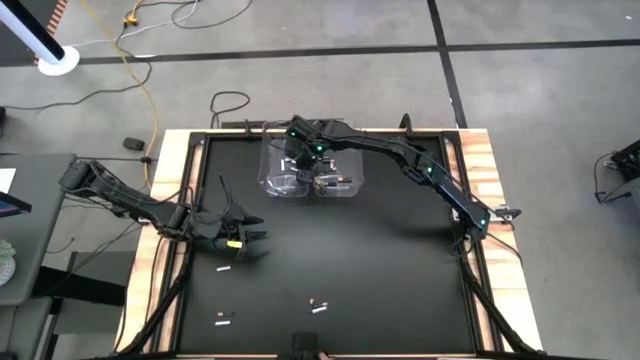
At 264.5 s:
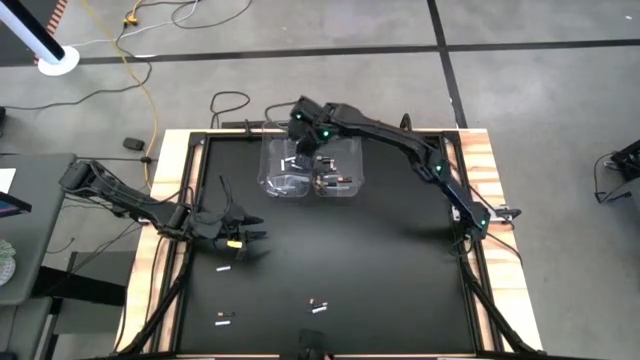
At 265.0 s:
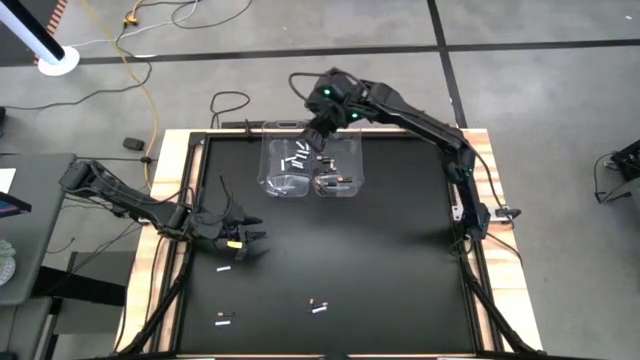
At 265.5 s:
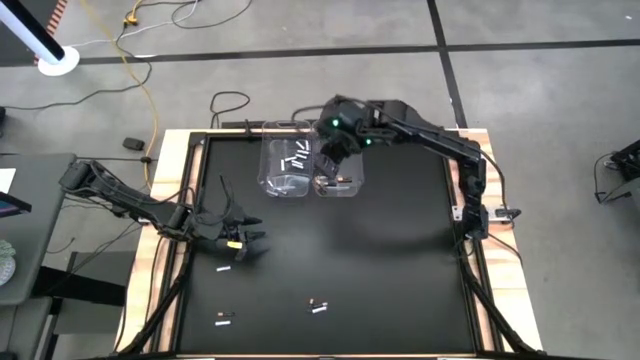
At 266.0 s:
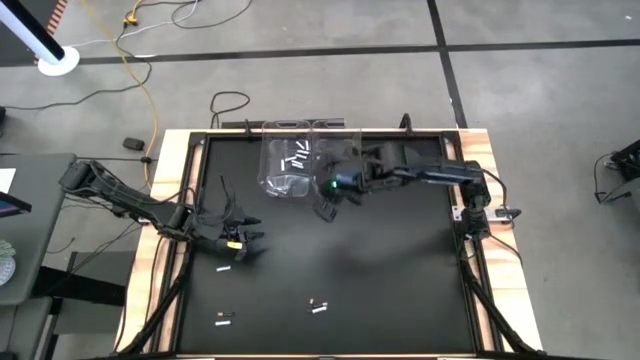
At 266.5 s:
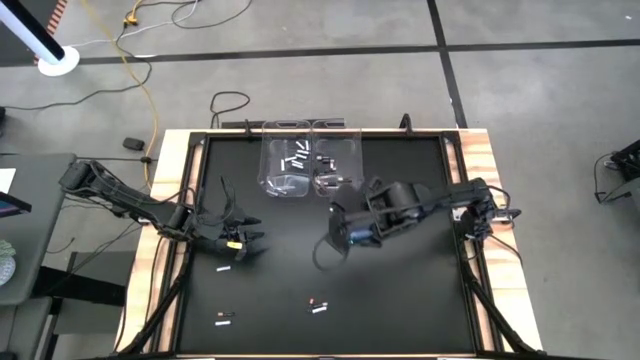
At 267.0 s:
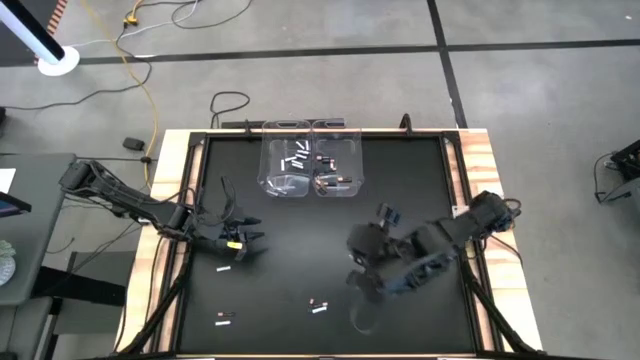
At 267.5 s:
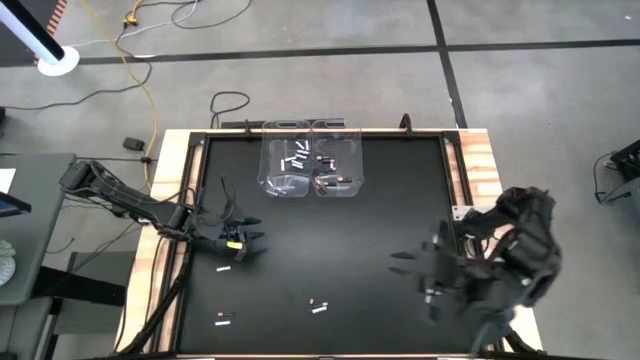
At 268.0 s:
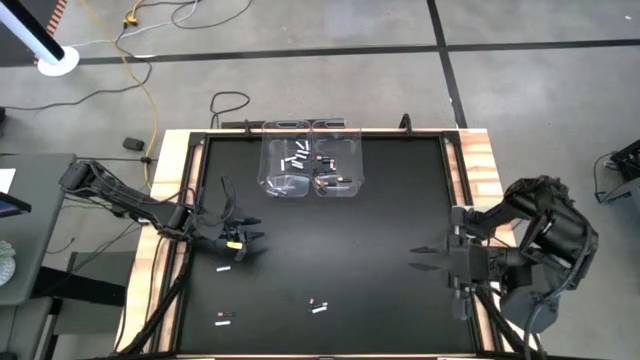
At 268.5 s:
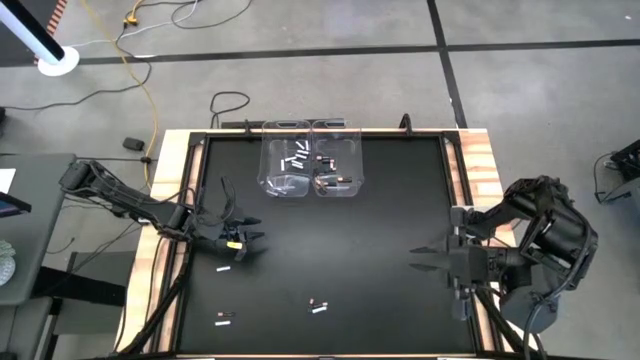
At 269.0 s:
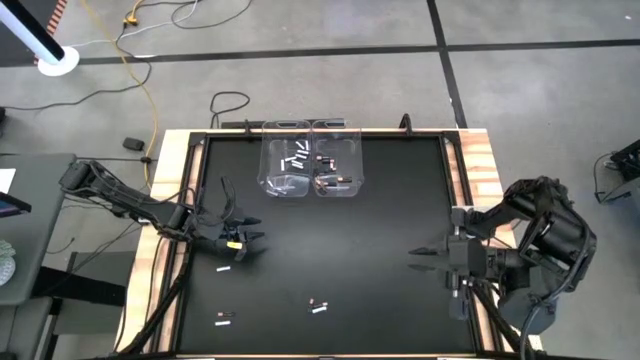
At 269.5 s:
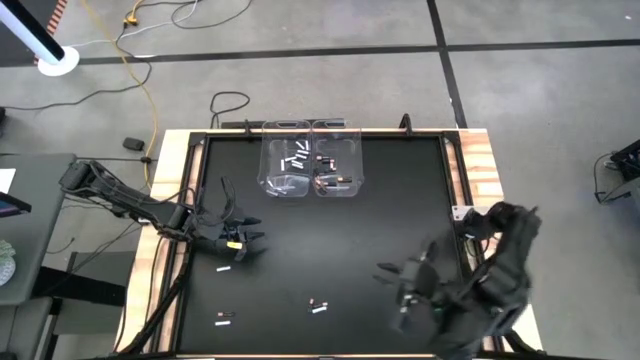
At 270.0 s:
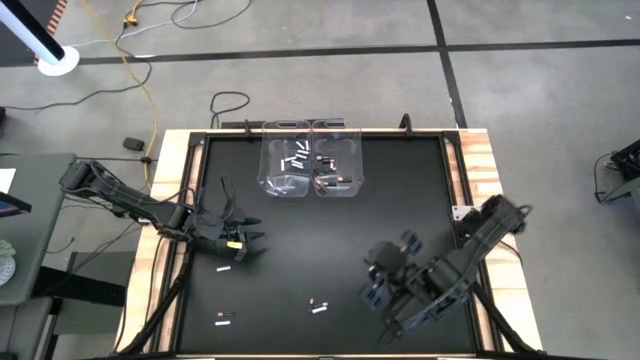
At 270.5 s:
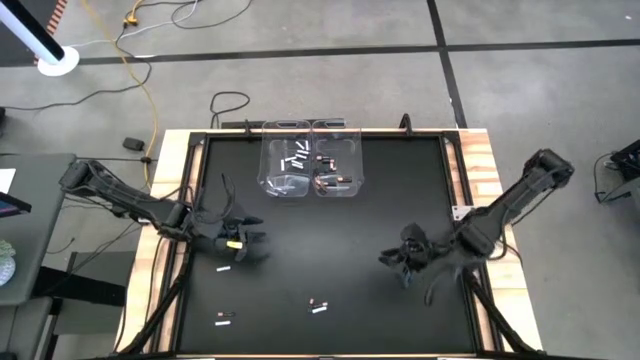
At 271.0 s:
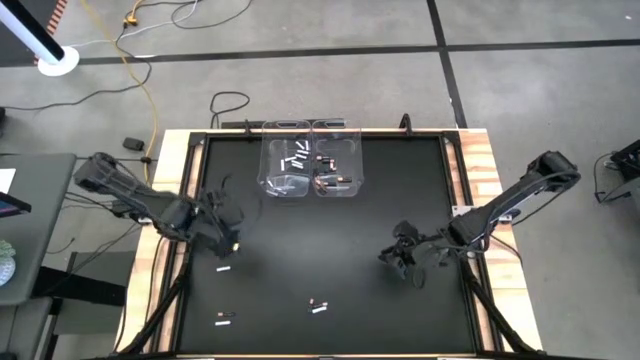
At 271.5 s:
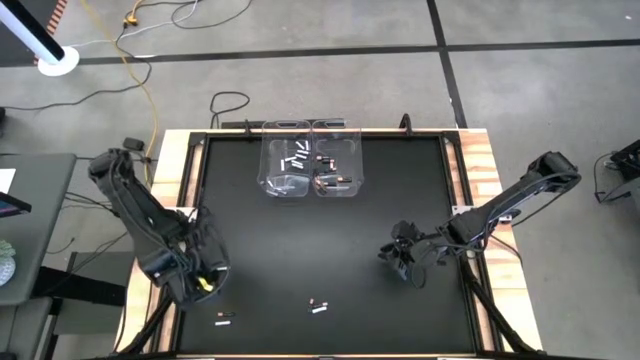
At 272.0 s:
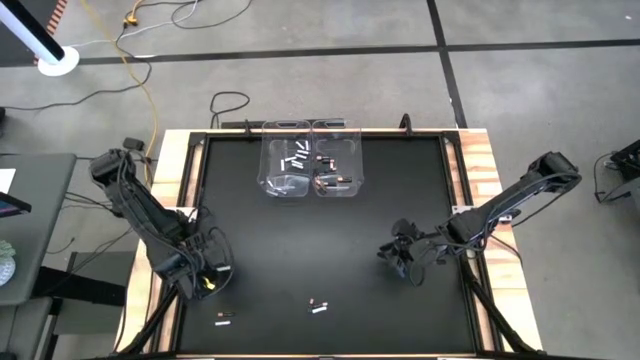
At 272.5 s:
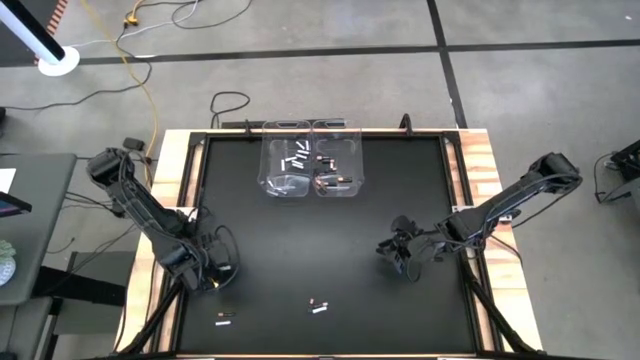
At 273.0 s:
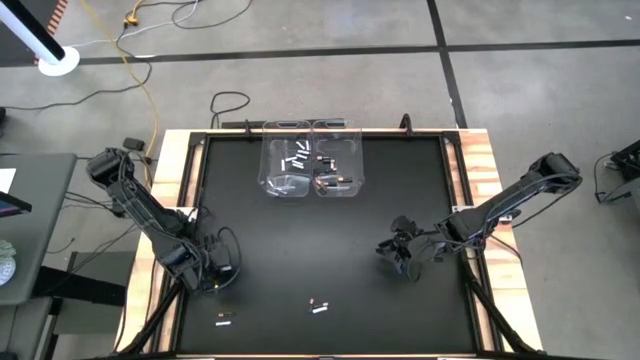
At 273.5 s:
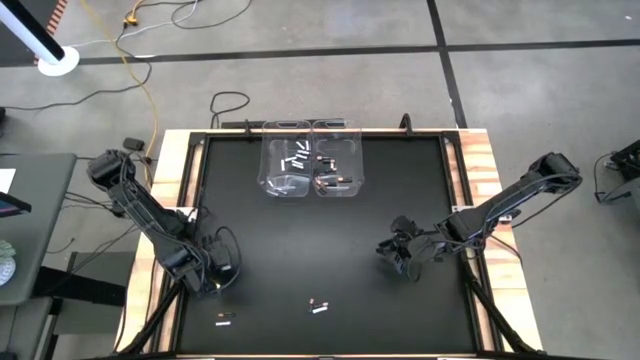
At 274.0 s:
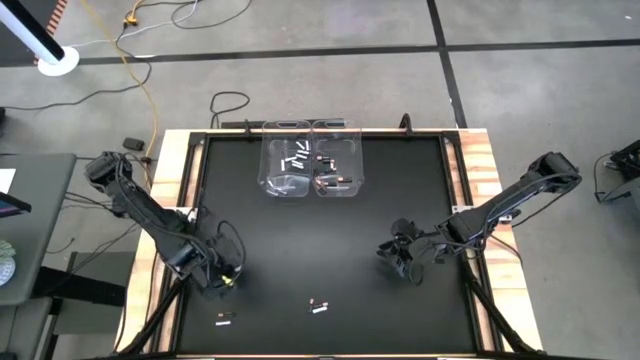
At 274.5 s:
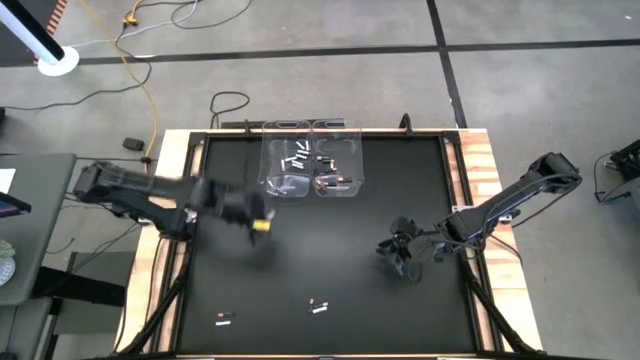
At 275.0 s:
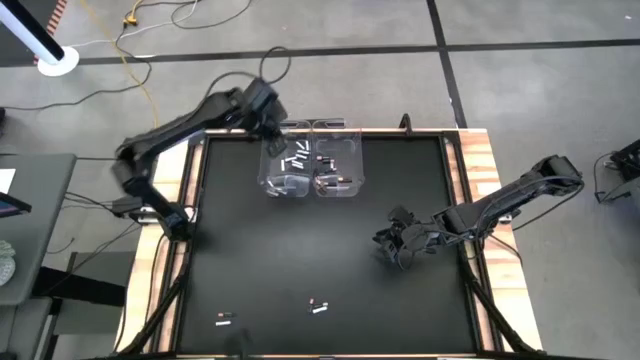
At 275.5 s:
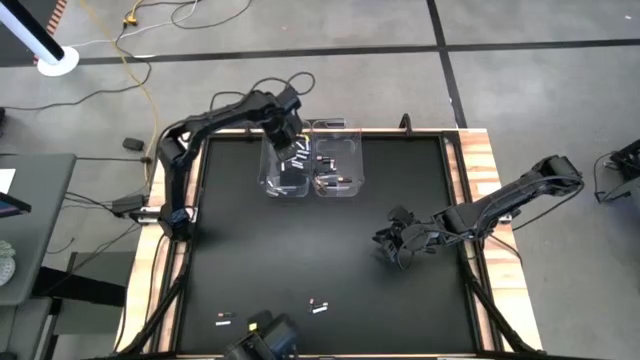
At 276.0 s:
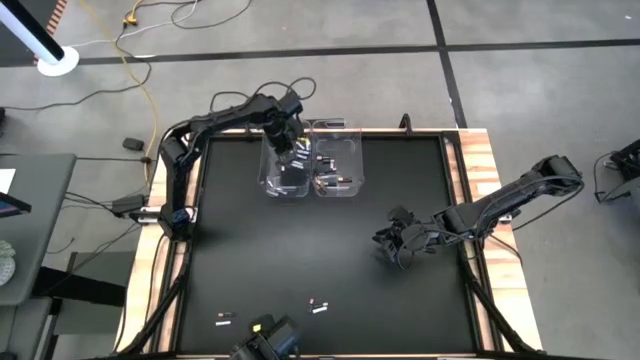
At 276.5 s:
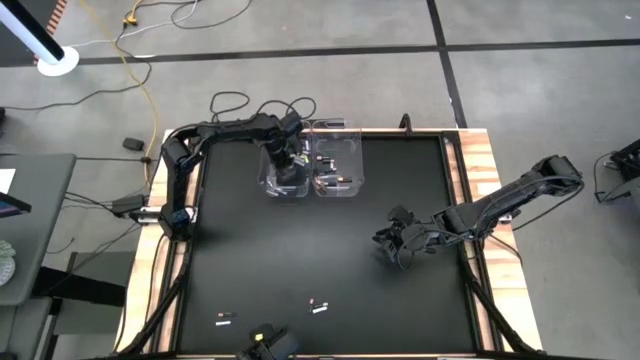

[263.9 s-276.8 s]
Task: Sort batteries
Put the white battery into the left transparent bin

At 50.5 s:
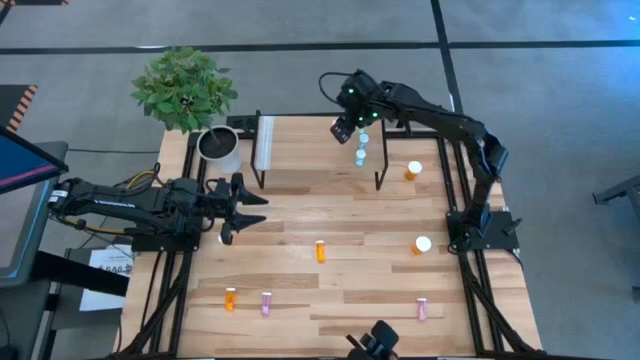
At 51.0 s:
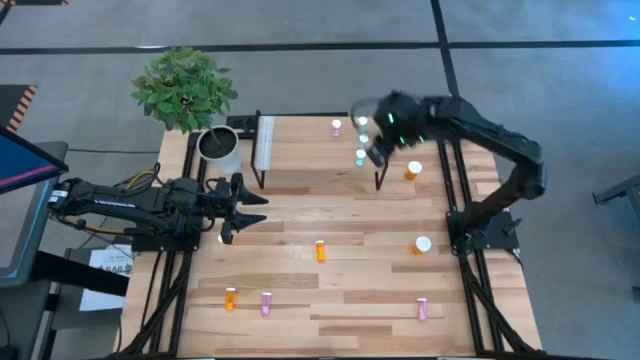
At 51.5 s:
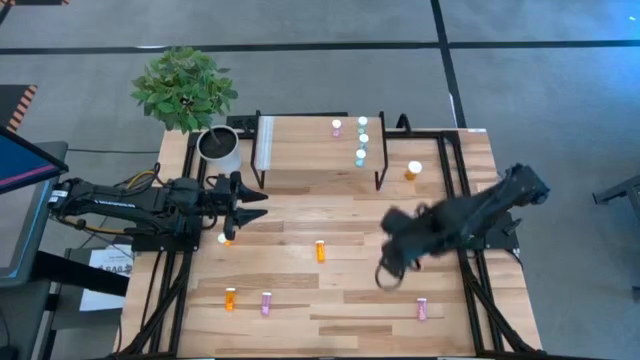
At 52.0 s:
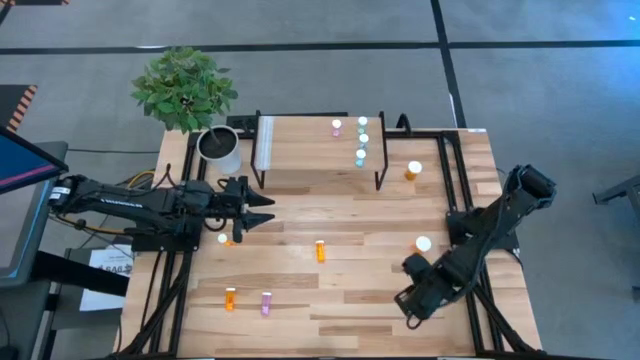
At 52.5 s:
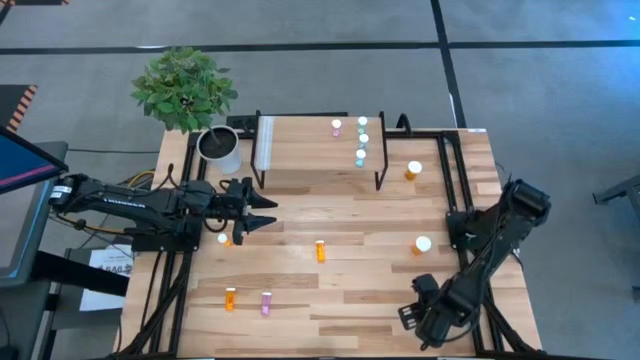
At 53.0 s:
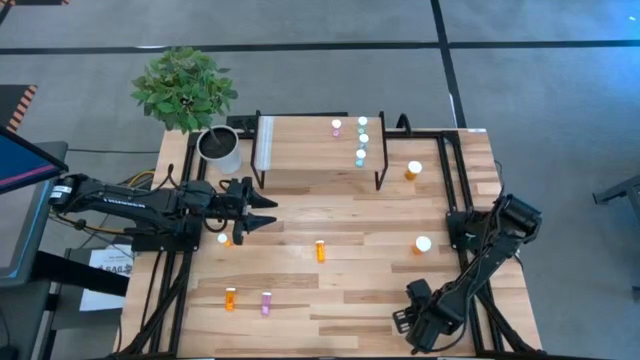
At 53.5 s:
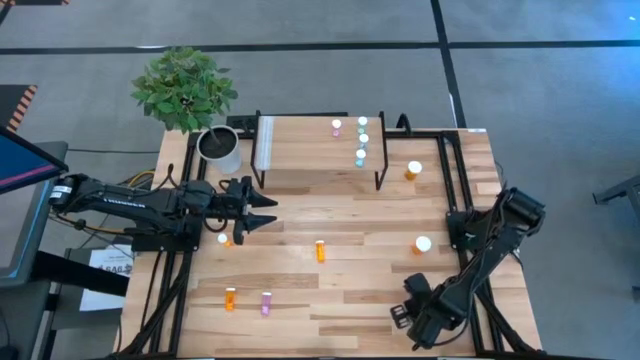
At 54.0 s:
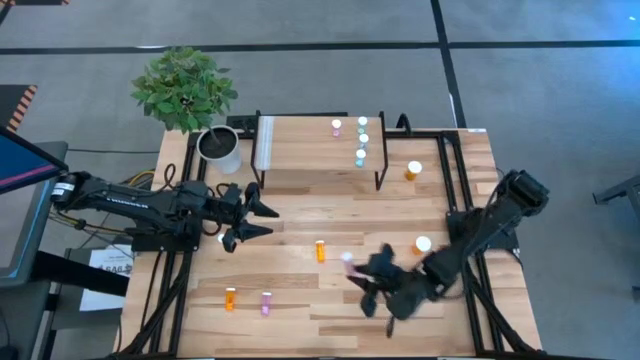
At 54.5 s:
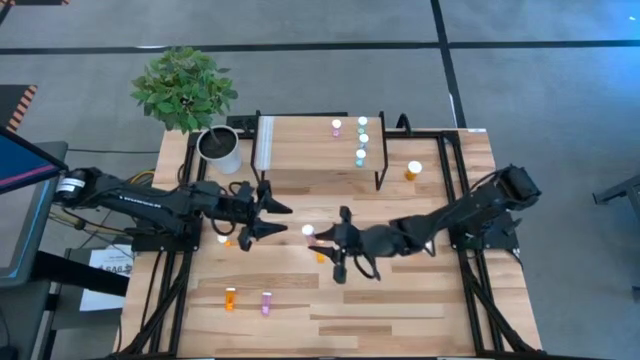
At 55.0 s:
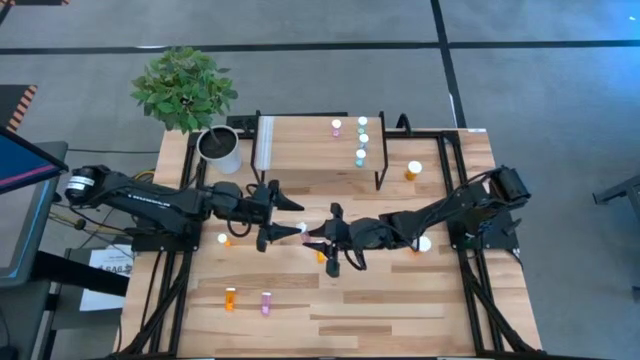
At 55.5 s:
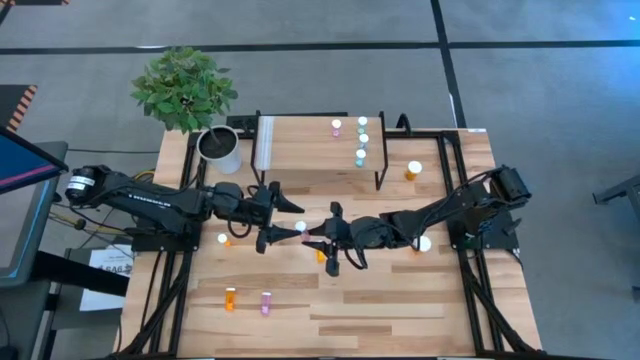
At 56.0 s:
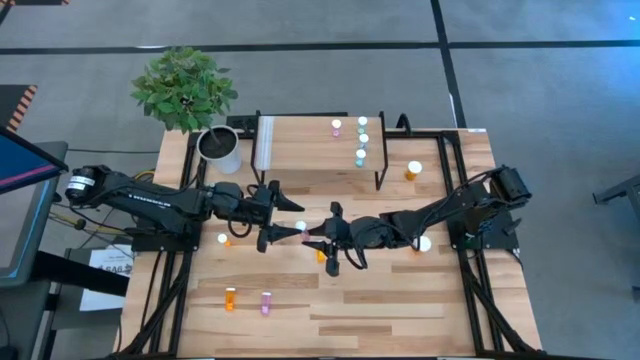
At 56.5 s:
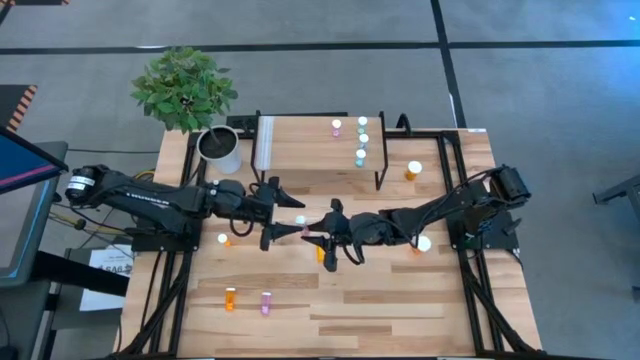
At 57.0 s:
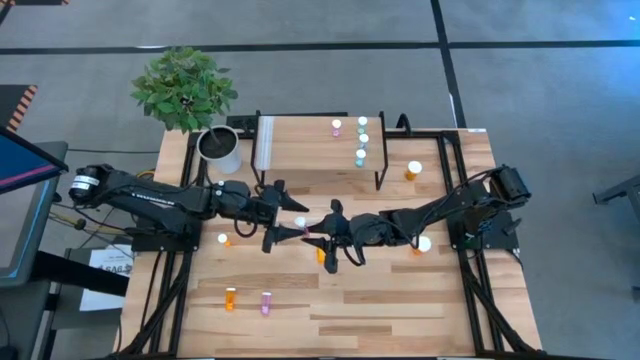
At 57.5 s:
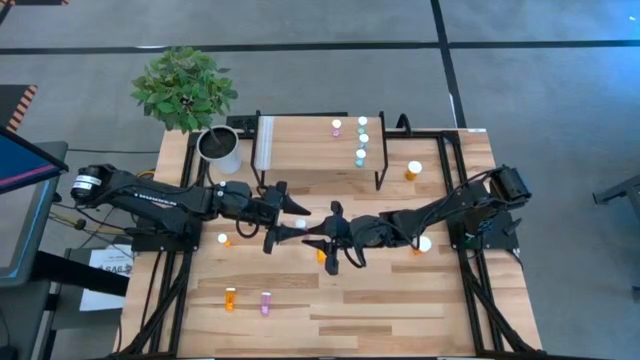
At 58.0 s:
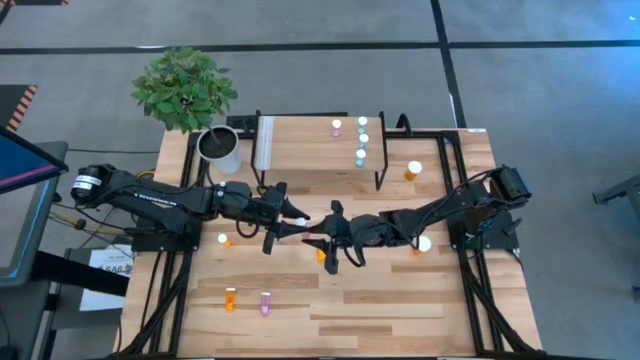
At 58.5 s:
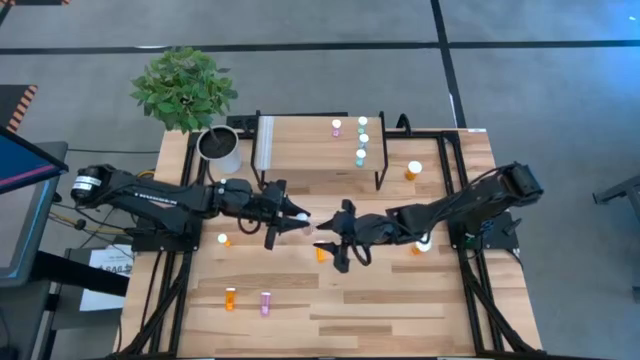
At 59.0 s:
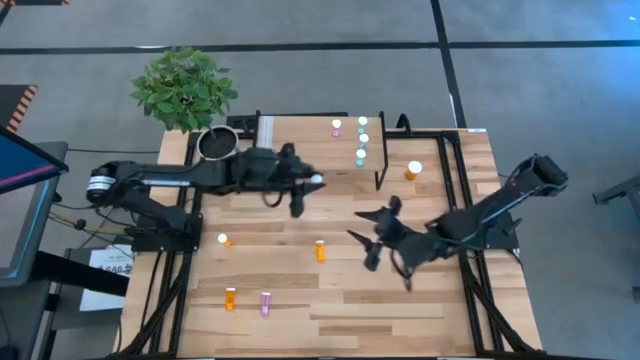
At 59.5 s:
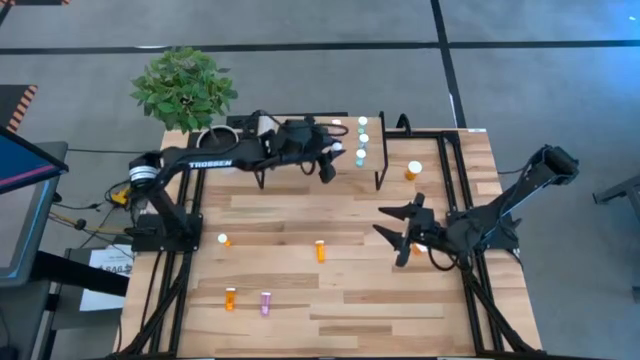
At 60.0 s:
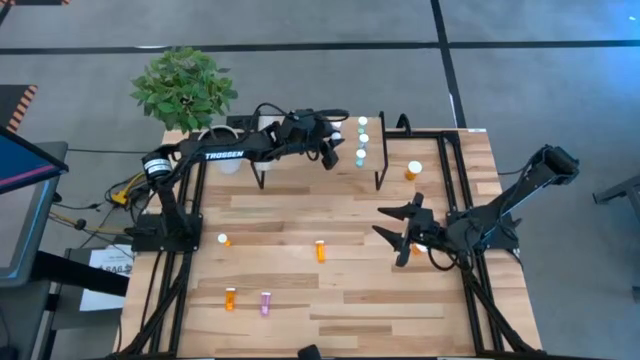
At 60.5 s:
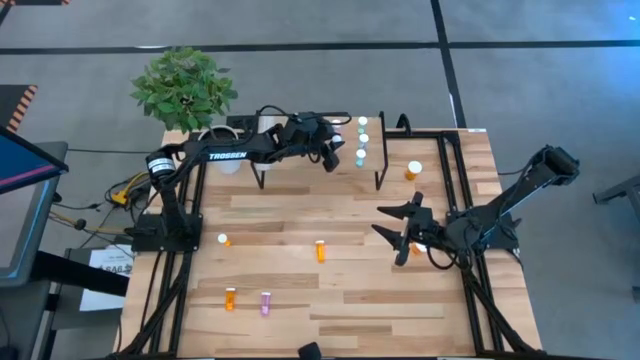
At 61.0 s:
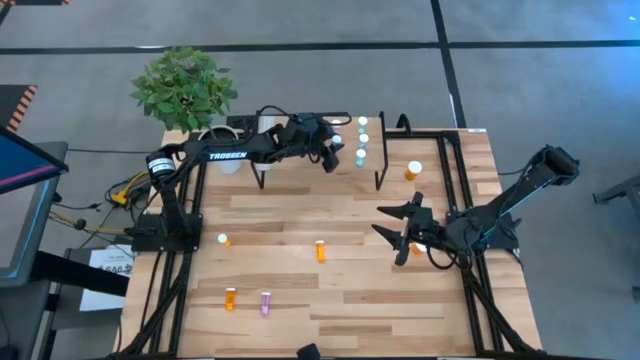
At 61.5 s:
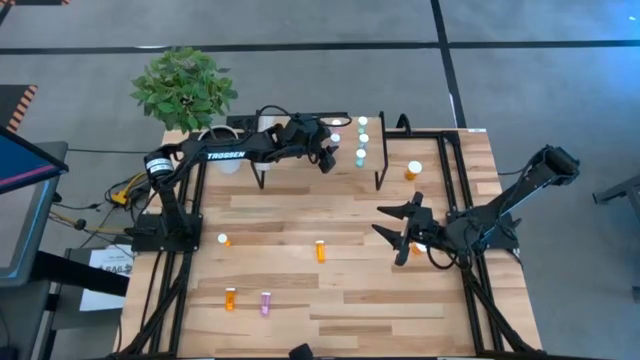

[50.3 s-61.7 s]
Task: Pick and place medicine bottles onto shelf by color
Put the right pink pill bottle on the shelf aligned with the other pink pill bottle
